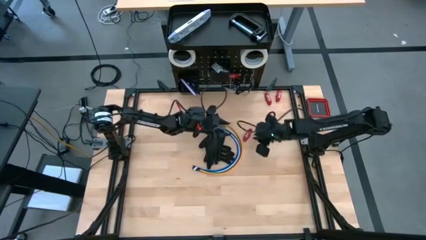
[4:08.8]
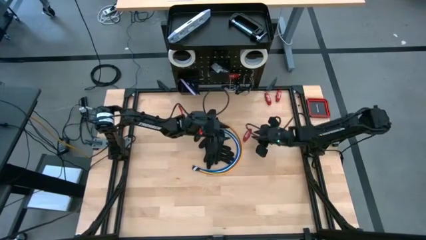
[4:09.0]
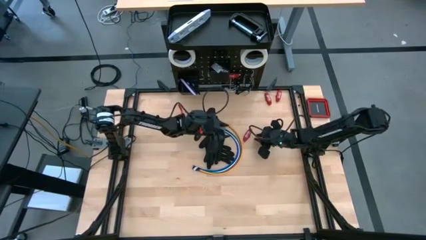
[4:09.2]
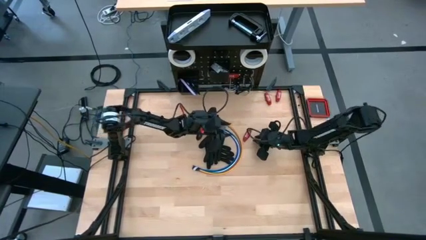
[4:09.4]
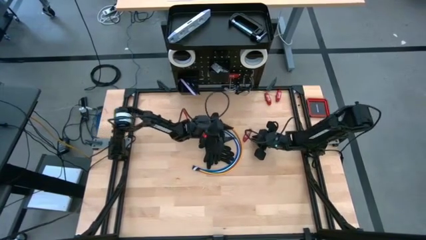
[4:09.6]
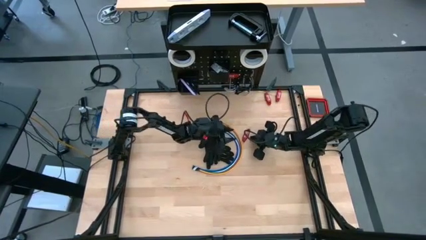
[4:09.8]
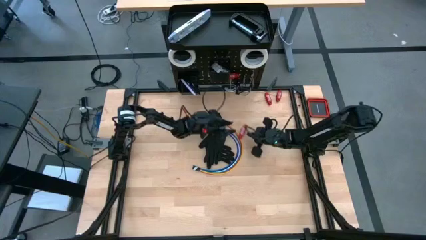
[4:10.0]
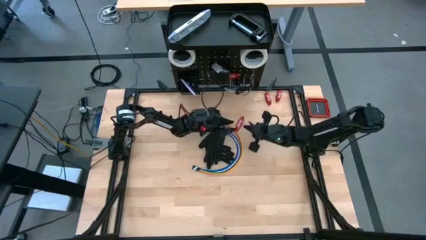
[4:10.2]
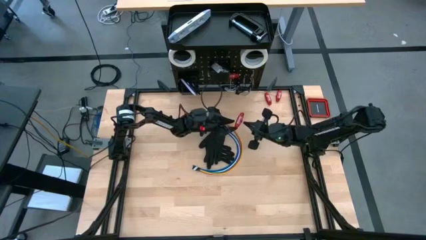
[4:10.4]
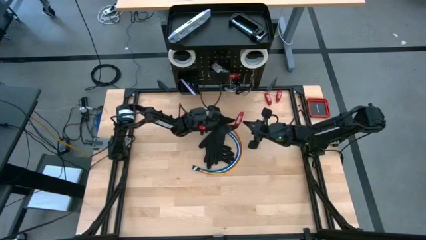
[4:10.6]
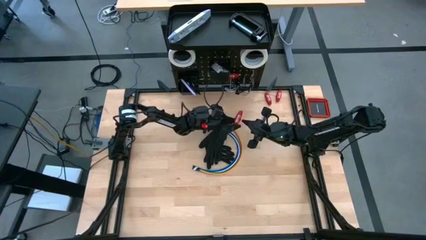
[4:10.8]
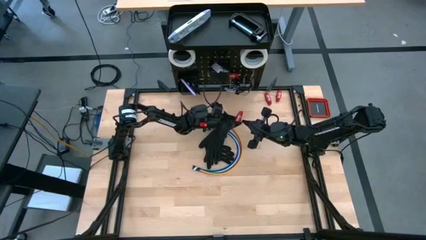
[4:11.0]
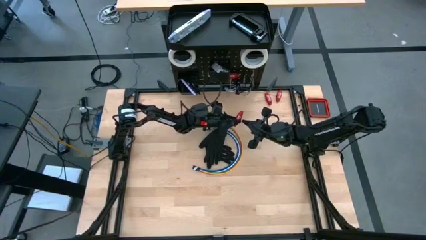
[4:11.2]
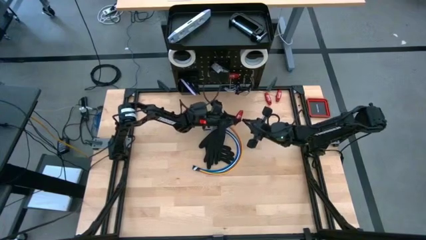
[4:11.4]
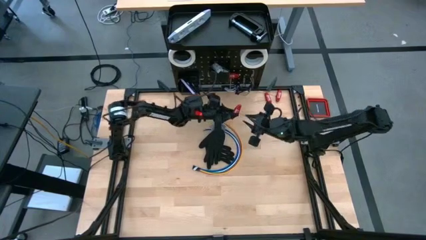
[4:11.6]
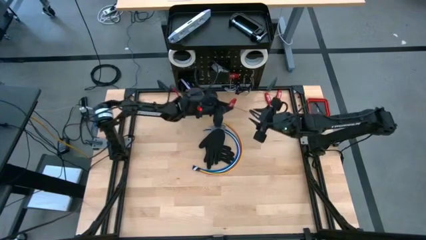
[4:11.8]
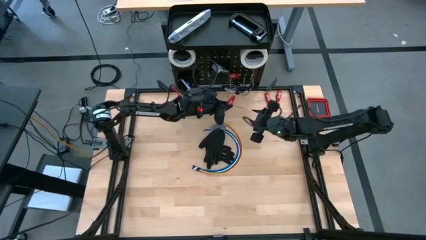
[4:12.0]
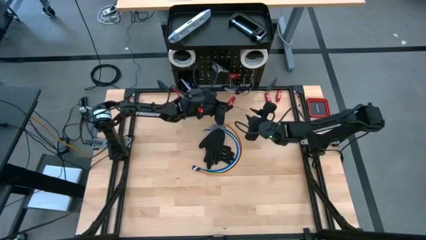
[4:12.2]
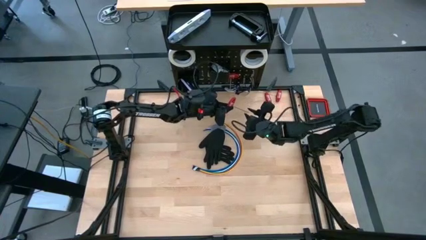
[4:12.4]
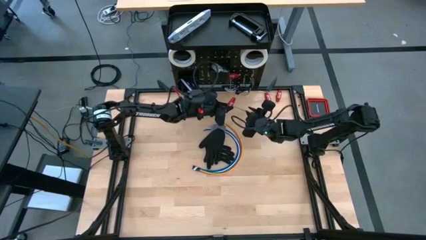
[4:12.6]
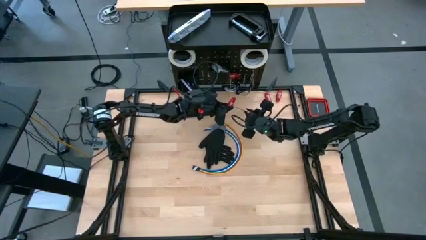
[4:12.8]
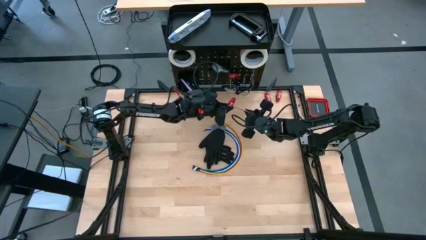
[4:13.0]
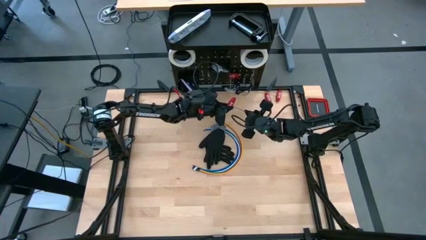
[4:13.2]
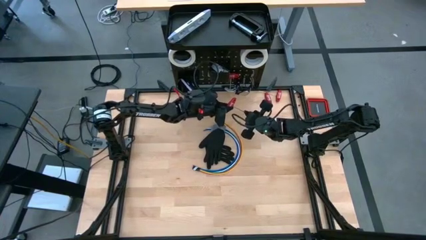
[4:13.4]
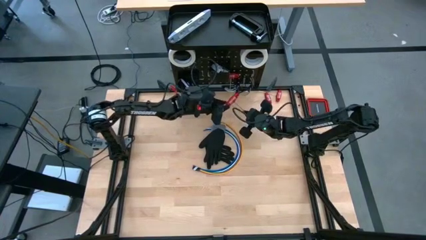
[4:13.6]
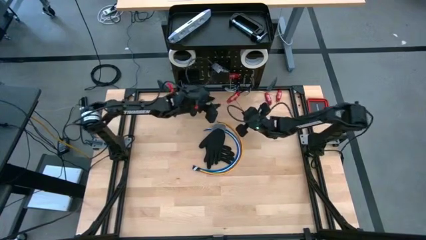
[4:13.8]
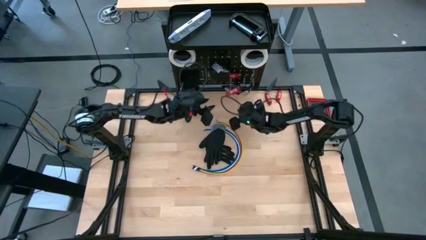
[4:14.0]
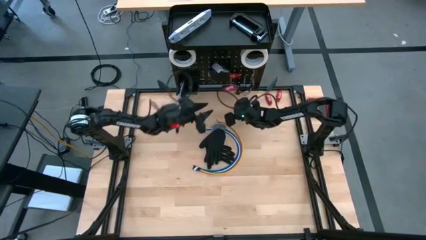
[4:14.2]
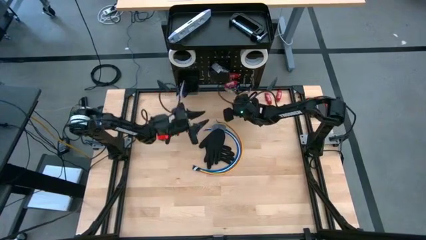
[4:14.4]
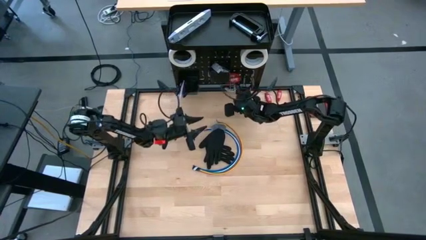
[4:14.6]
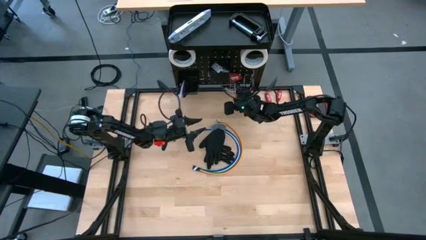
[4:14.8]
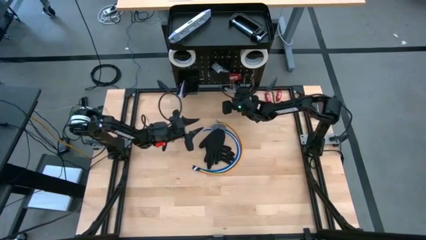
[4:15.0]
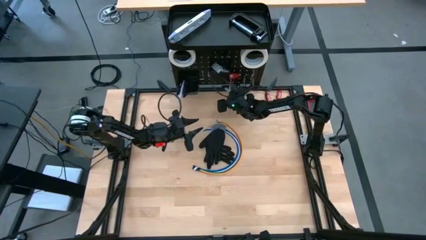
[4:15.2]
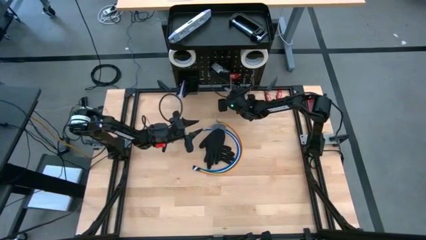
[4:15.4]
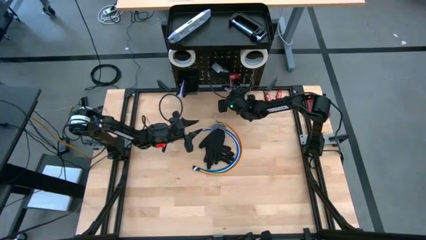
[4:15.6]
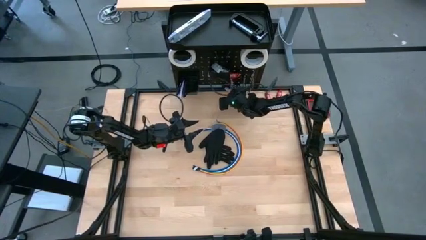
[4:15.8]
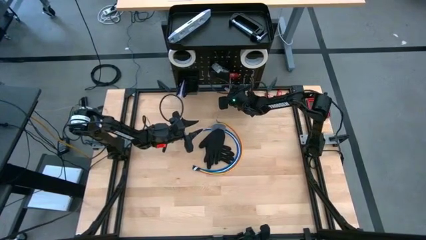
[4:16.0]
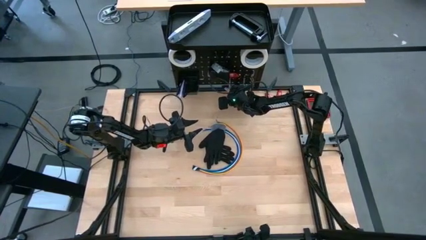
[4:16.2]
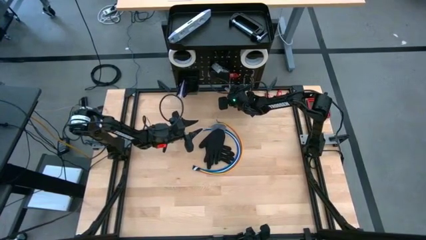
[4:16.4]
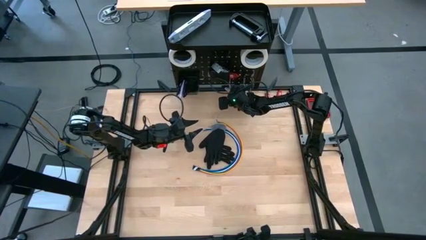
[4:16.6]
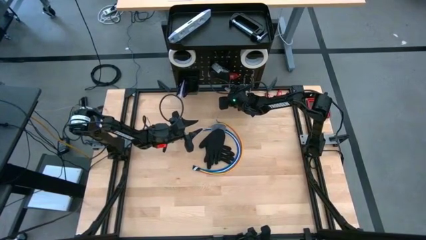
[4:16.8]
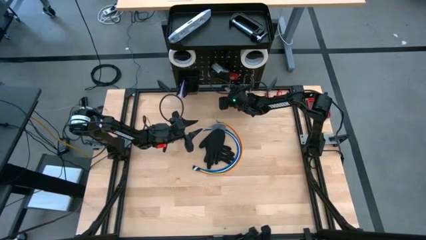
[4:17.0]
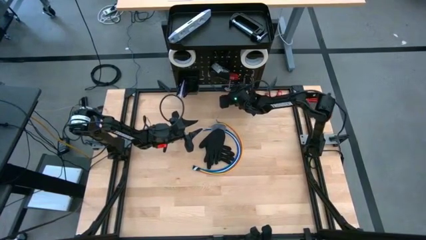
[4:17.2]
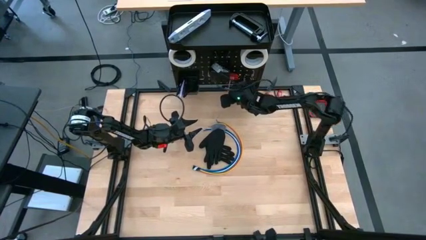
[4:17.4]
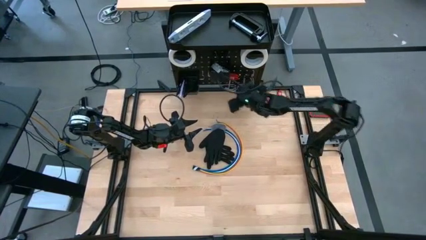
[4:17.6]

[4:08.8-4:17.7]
Task: Hang tools onto peg board
Hang the red allen wrench on the peg board

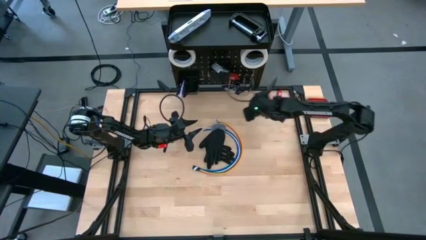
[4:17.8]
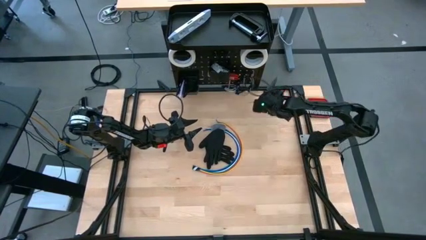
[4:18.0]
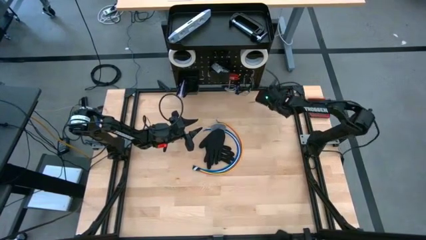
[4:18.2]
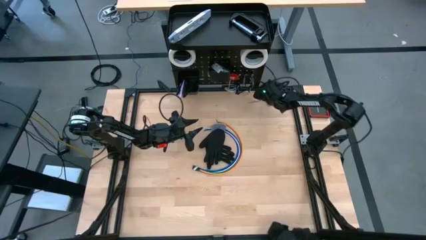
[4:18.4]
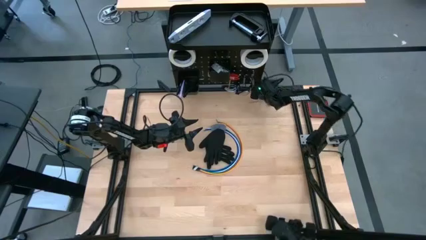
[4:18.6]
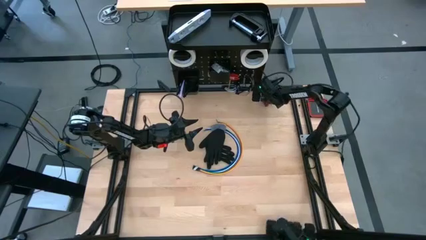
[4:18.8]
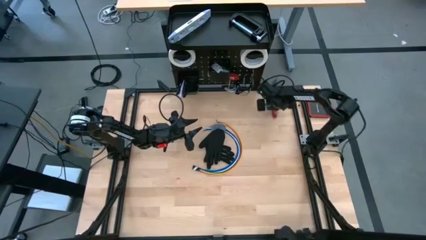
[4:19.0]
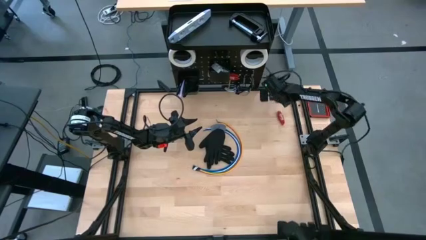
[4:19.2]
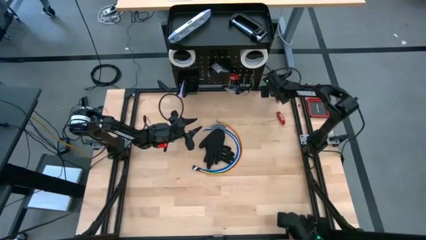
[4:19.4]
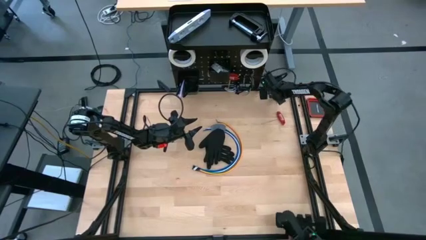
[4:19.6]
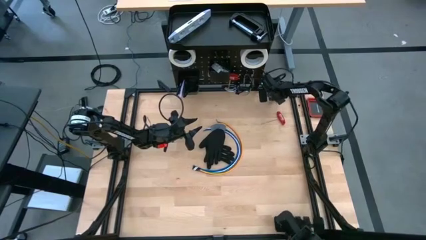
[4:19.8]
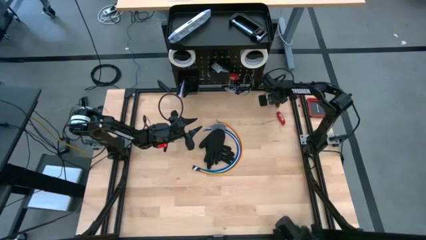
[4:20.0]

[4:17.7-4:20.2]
Adjust the red allen wrenches

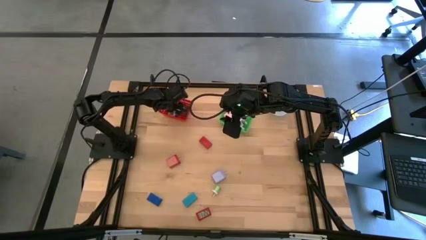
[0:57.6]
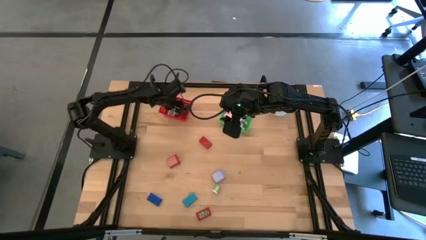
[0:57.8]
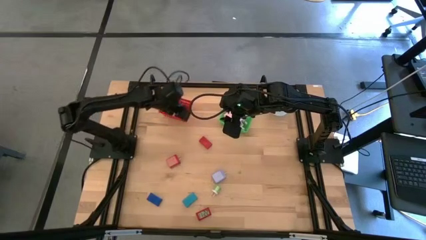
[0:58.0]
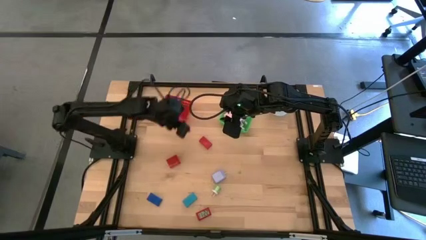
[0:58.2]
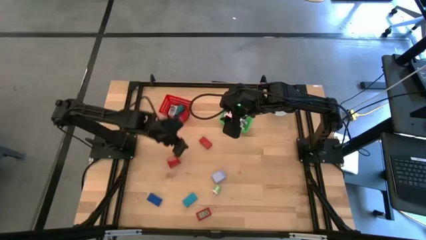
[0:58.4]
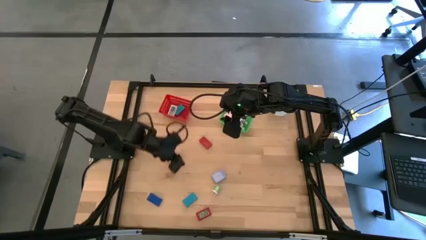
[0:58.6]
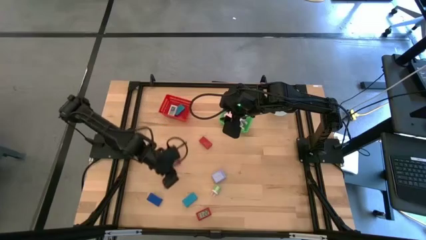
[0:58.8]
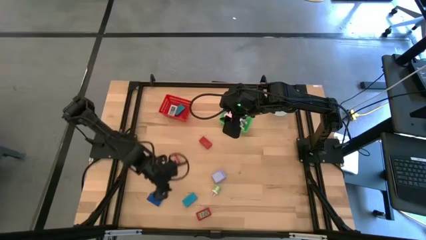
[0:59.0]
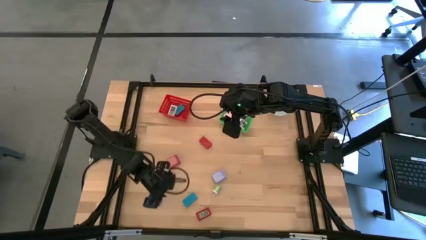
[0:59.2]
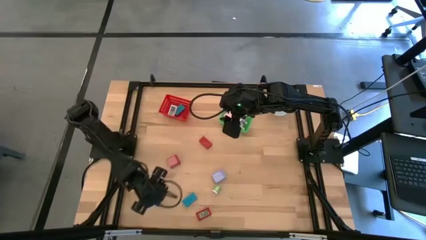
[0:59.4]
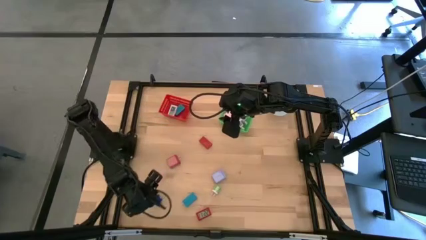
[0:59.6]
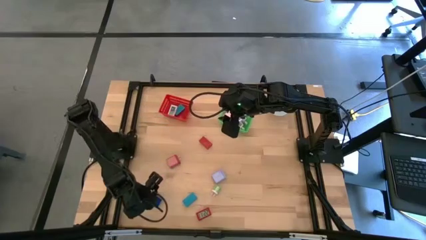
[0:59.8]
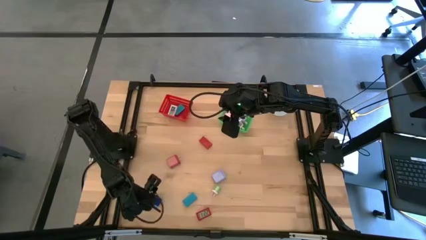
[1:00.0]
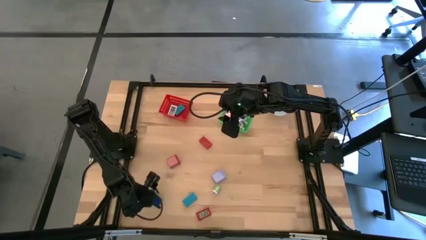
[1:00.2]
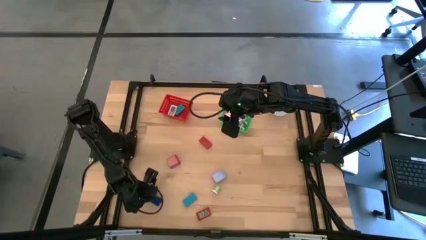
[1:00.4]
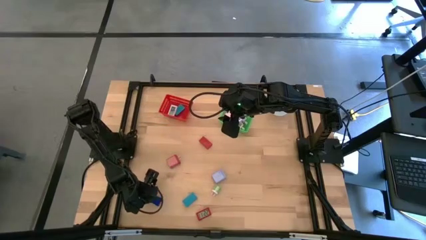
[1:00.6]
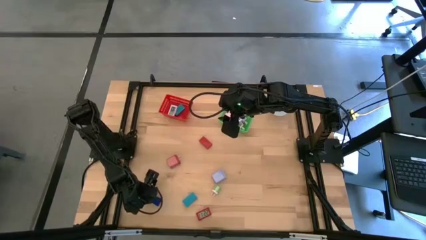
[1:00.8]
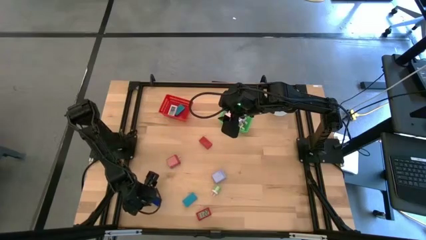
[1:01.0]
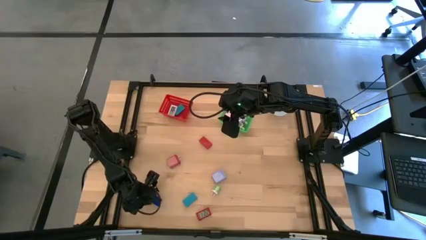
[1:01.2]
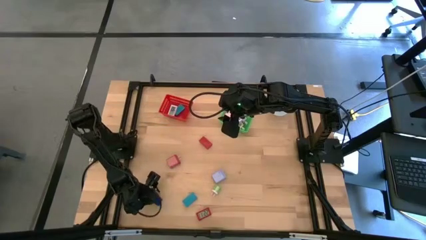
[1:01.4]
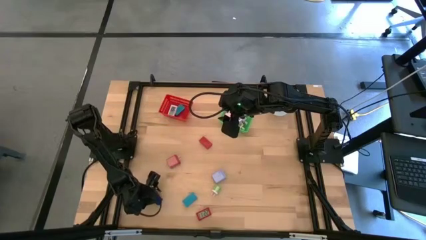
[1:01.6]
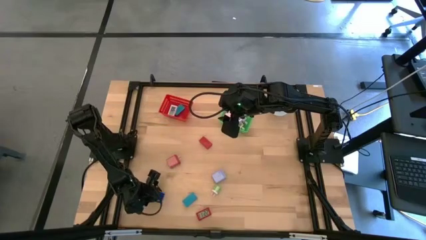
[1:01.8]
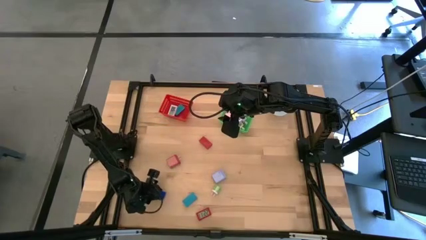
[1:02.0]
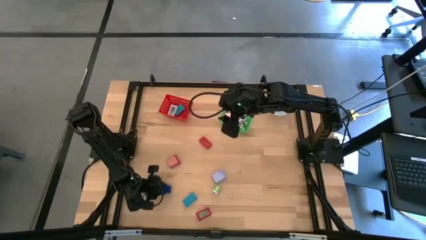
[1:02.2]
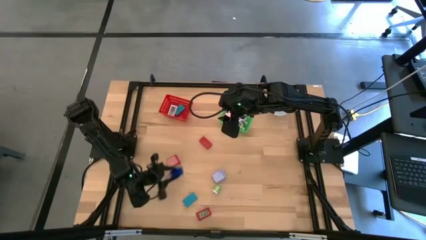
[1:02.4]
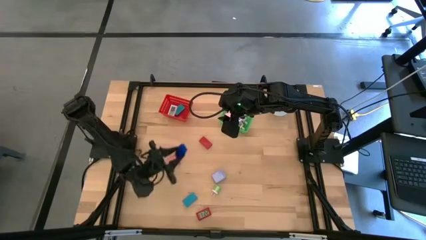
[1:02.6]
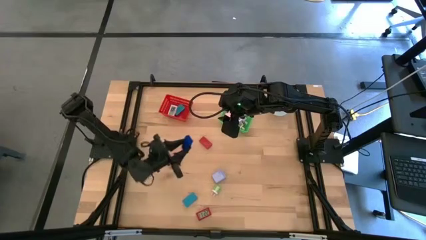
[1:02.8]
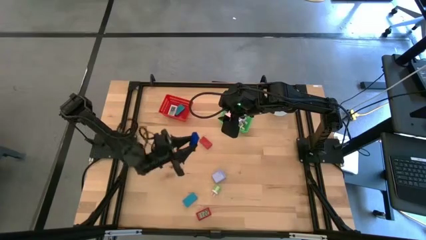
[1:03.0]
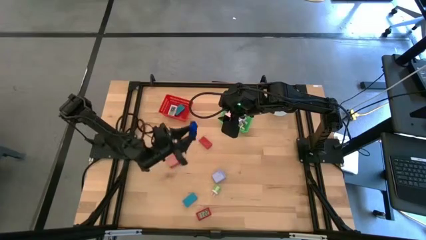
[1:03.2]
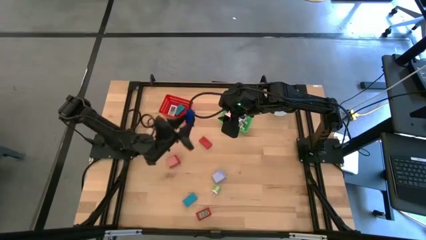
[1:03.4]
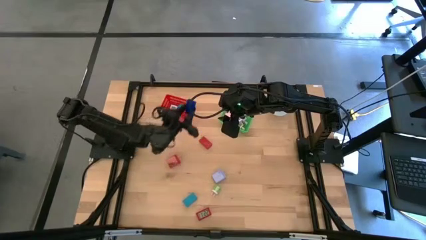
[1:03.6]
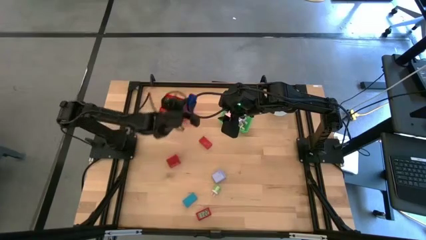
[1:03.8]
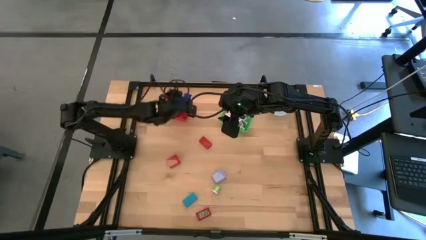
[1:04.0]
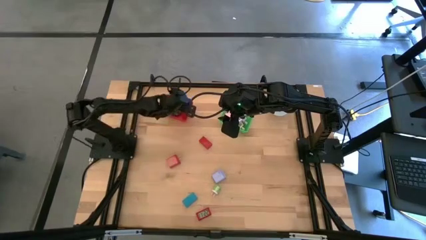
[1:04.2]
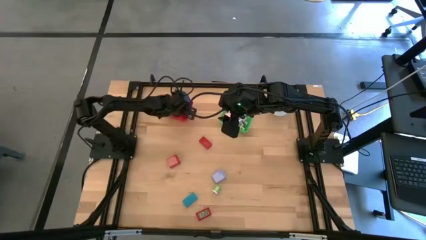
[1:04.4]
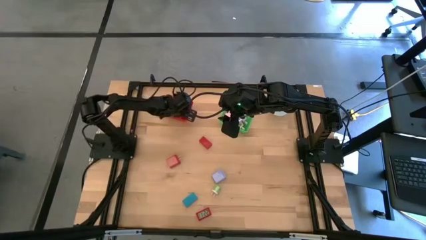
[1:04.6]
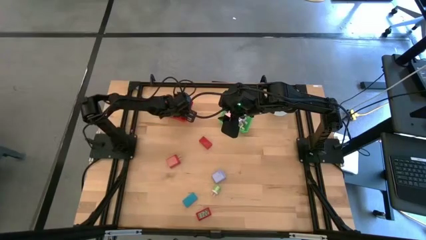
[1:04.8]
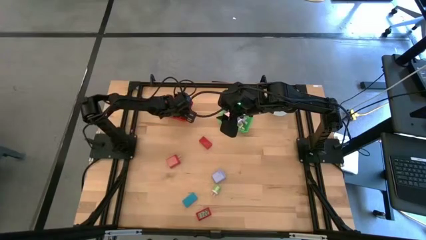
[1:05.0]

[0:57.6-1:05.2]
Task: Pick & Place Office items
Put the blue digital clock into the red bin
